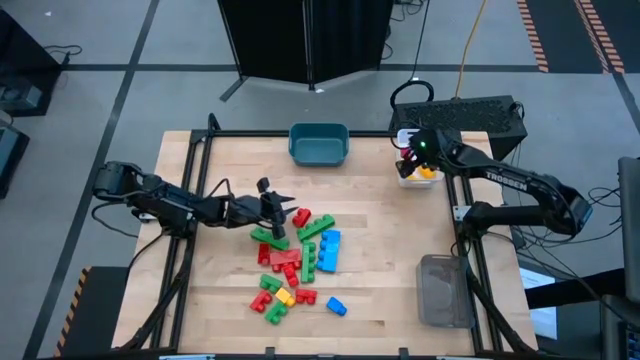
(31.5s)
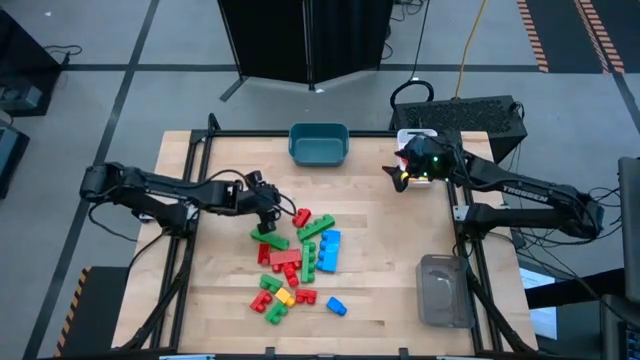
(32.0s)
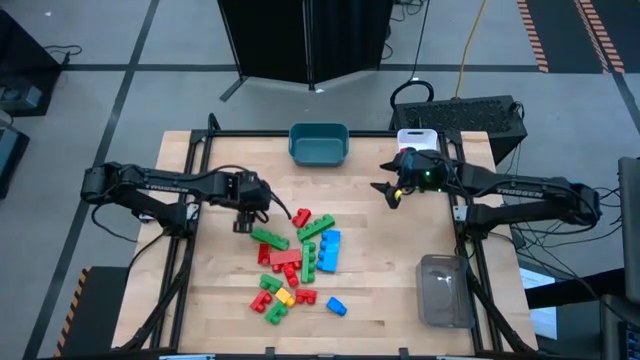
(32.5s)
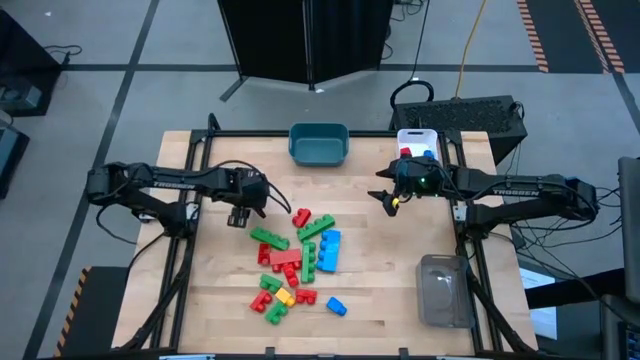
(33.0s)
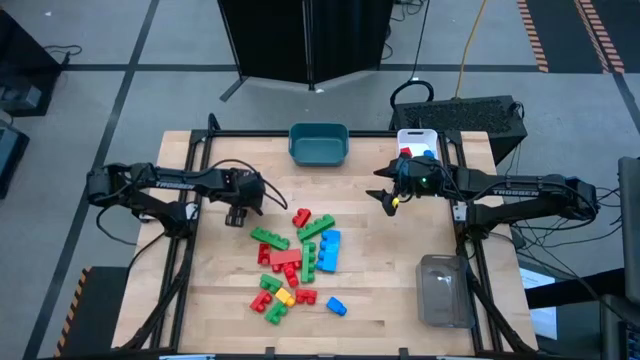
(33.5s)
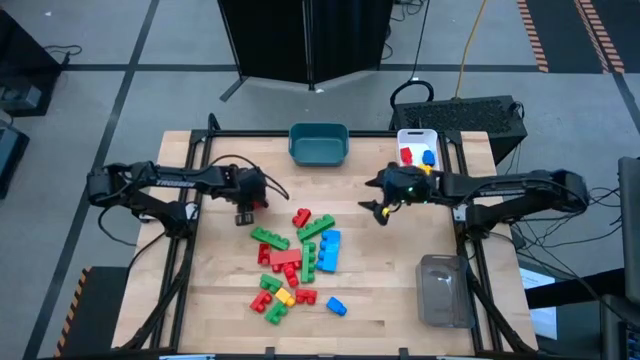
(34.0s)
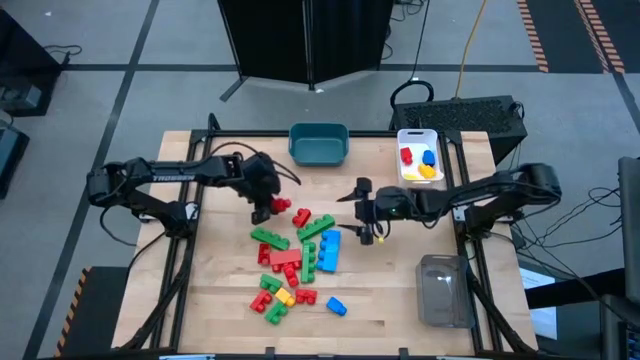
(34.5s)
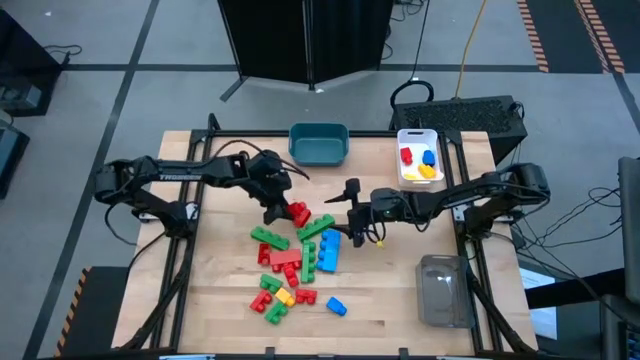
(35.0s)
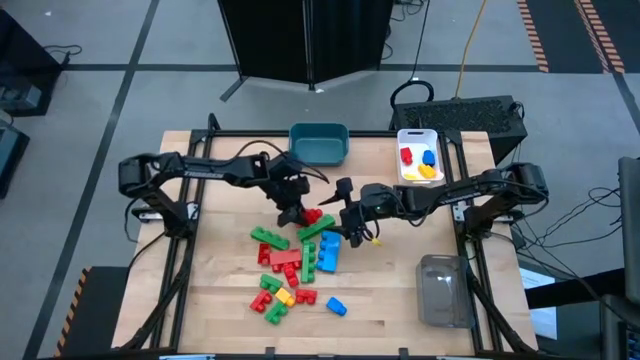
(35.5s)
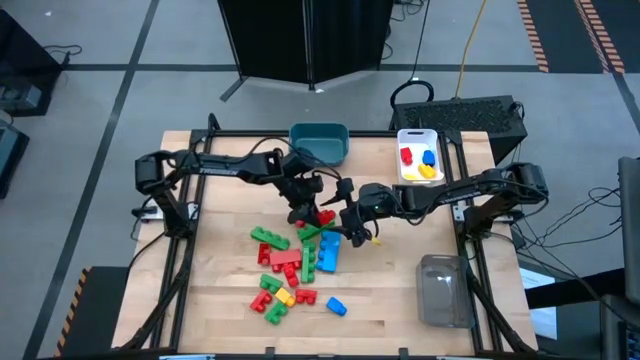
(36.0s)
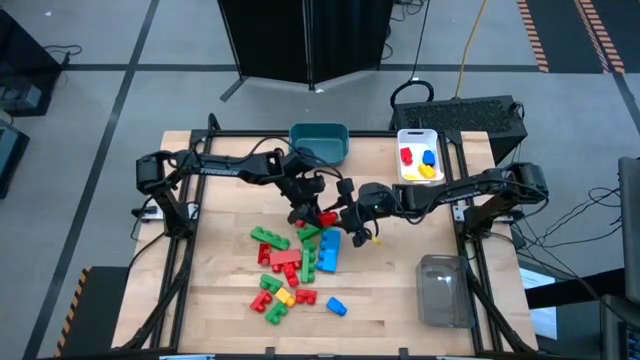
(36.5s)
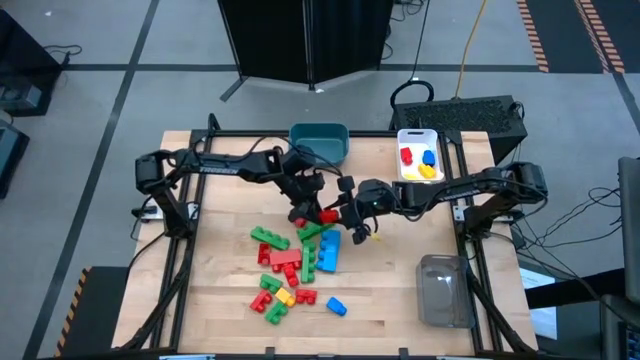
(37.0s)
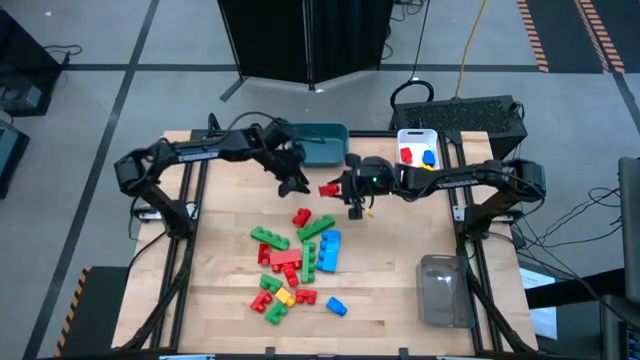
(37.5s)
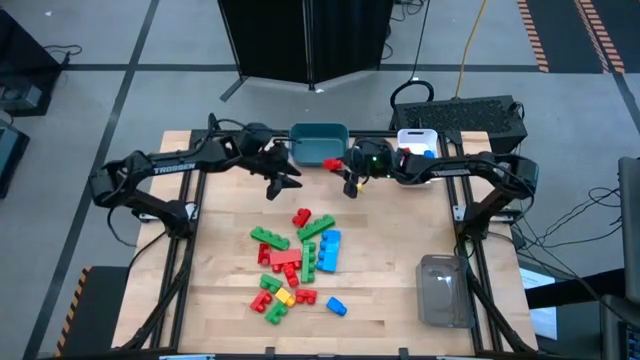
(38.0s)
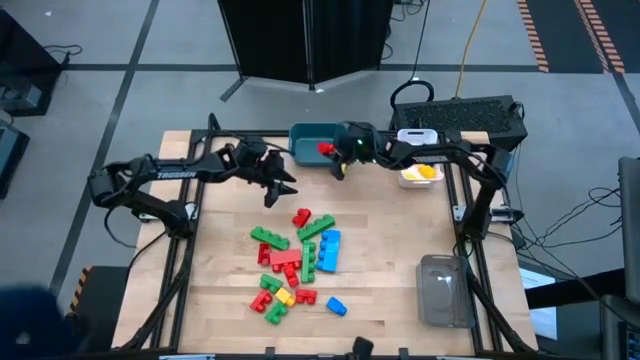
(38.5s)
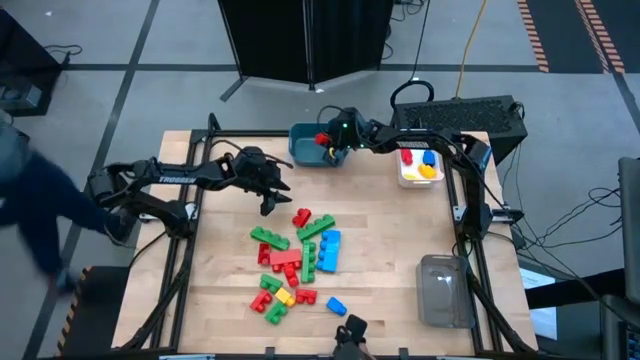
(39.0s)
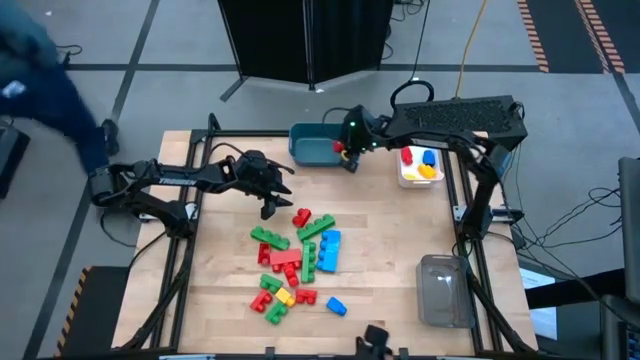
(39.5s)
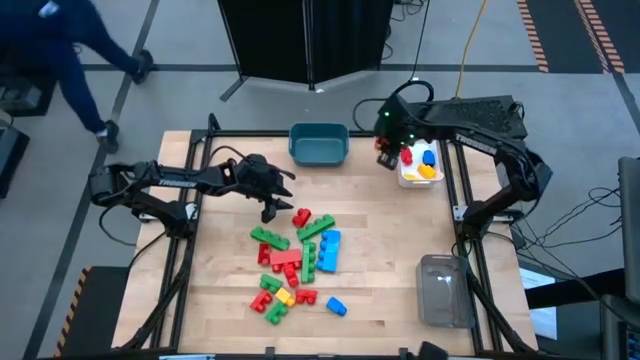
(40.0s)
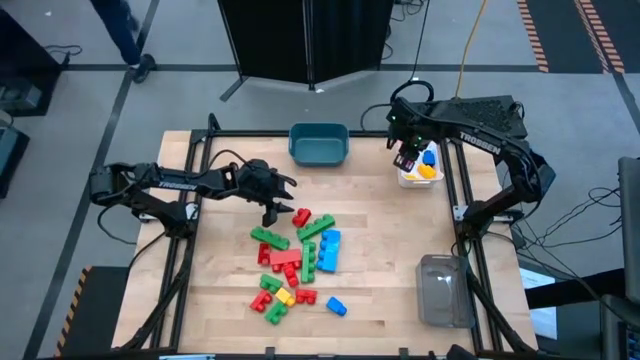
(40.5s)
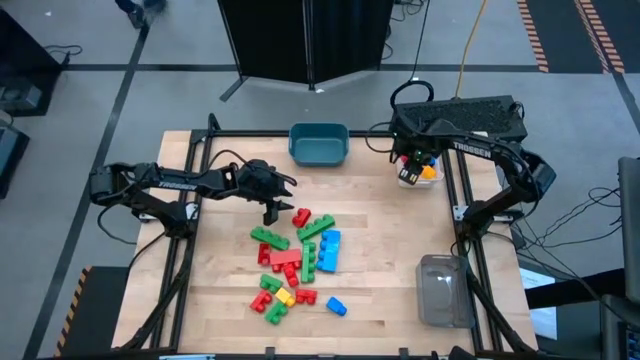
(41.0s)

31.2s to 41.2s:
Task: Sort blocks by size
Put the one stud red game piece into the white bin

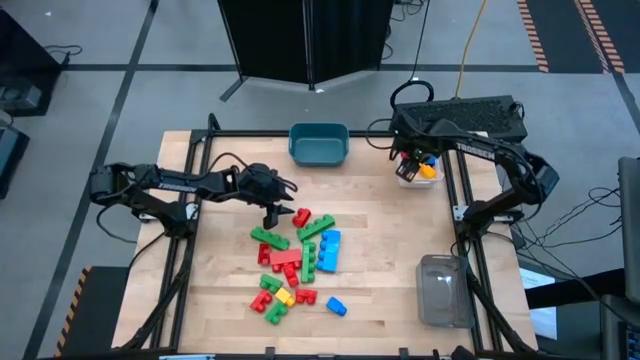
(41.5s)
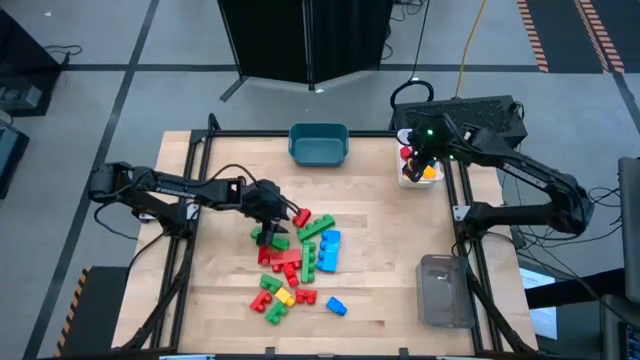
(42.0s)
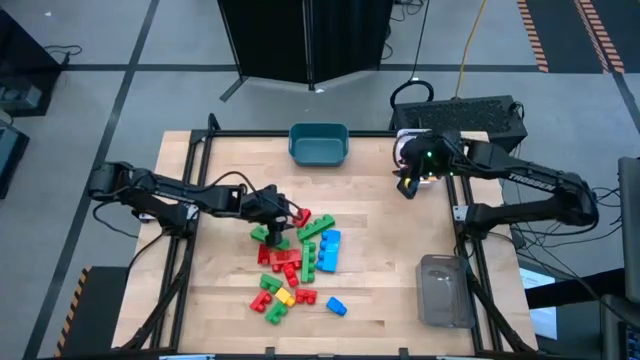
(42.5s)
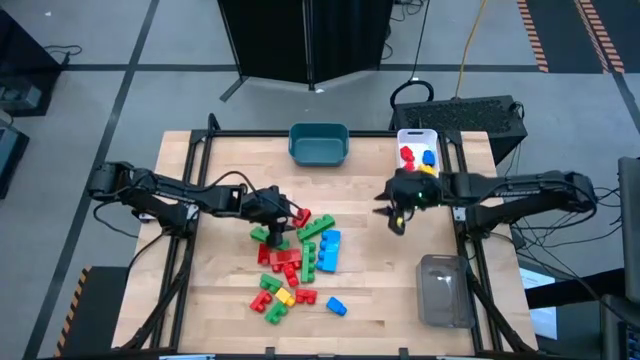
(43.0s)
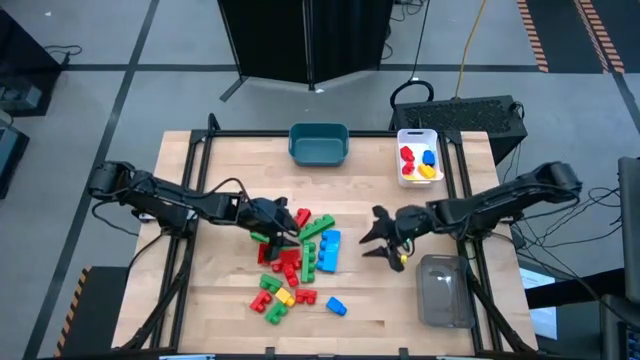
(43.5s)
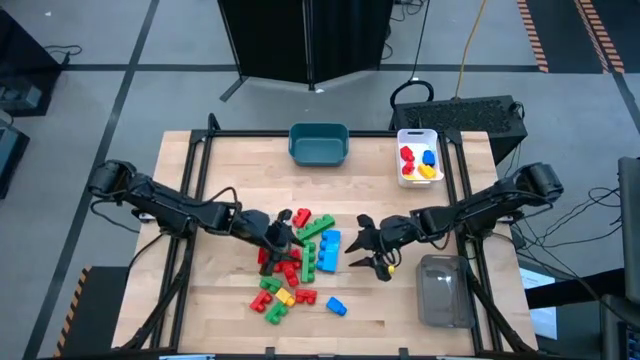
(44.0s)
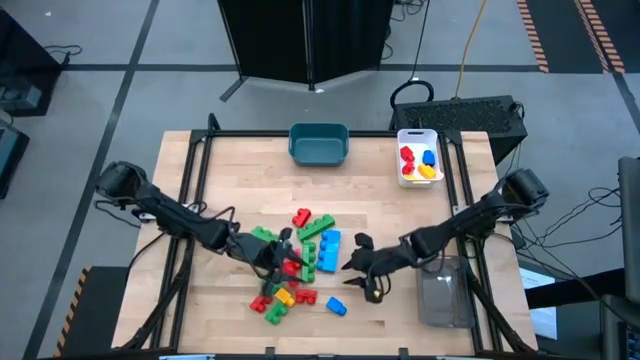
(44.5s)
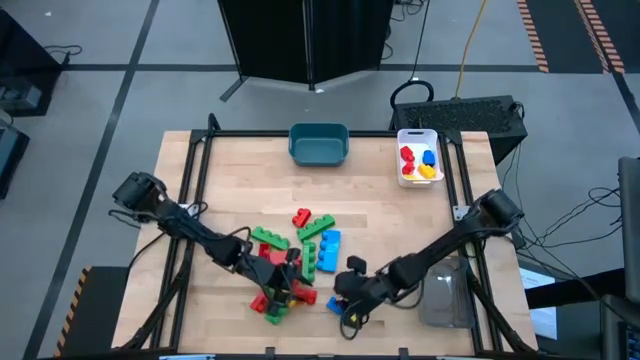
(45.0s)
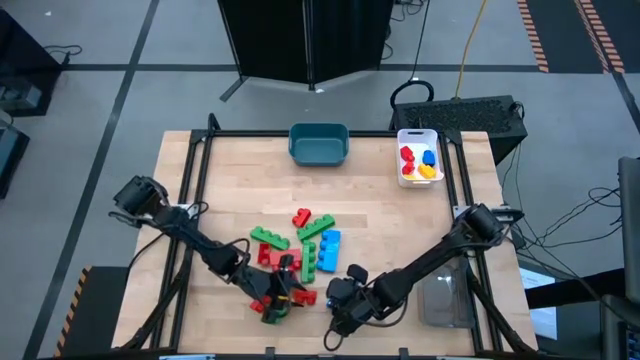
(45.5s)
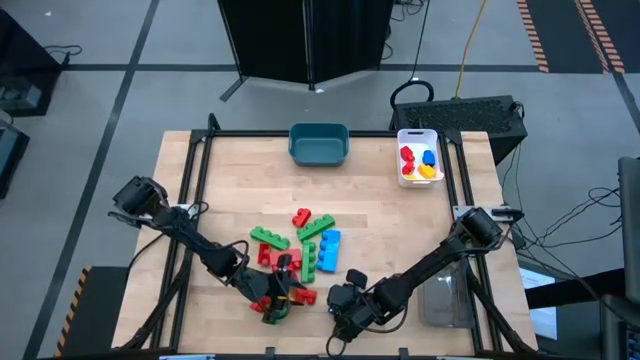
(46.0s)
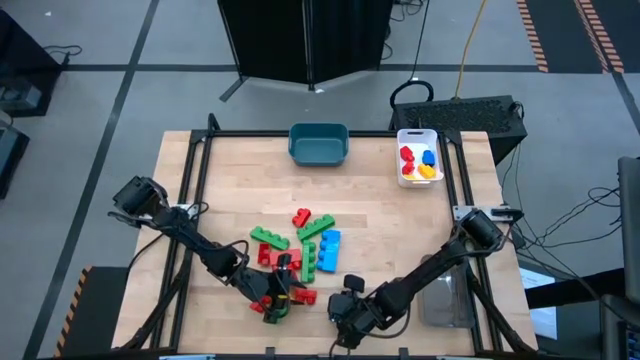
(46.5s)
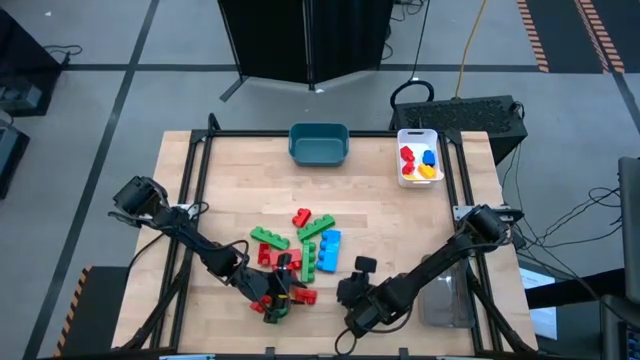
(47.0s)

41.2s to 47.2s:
Put the one stud blue game piece into the white bin

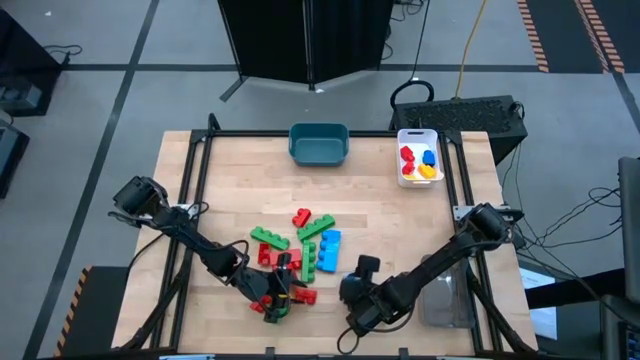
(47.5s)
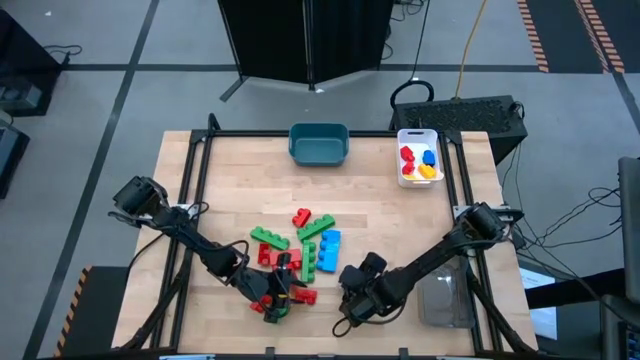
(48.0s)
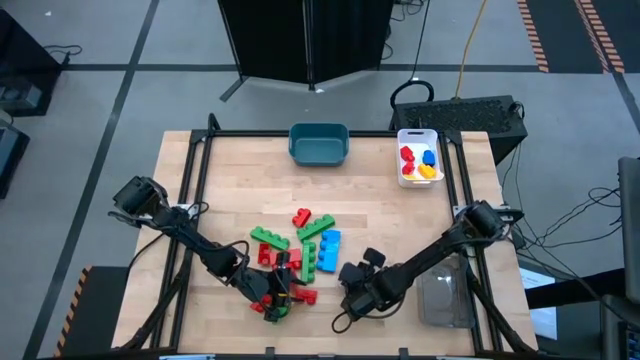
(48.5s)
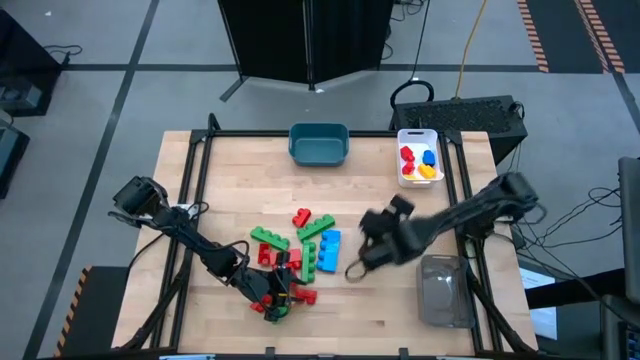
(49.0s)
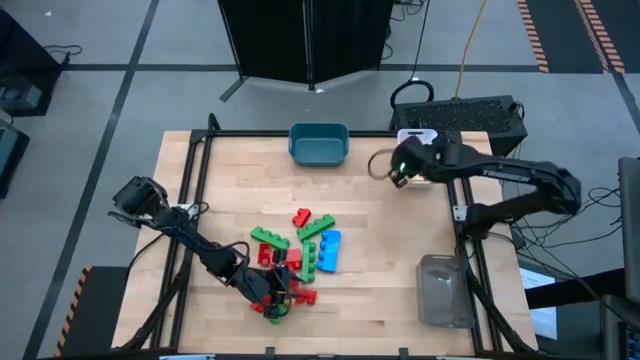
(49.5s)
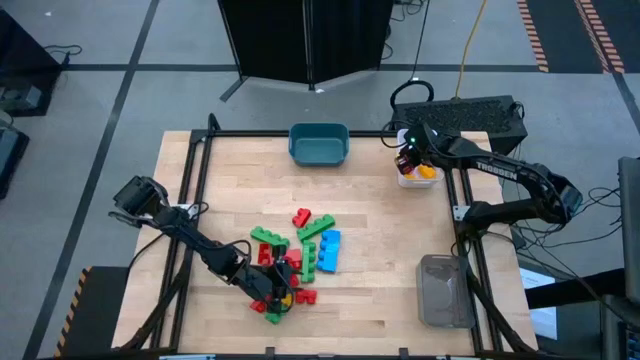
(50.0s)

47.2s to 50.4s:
Put the one stud blue game piece into the white bin

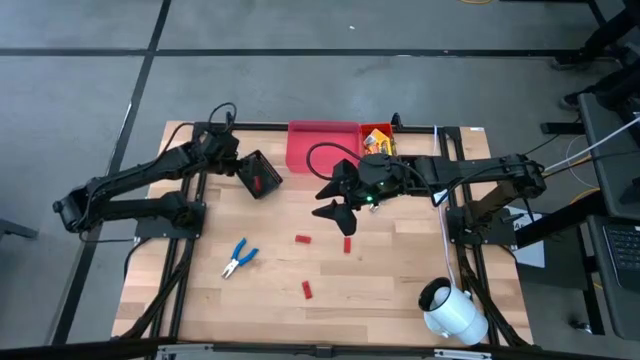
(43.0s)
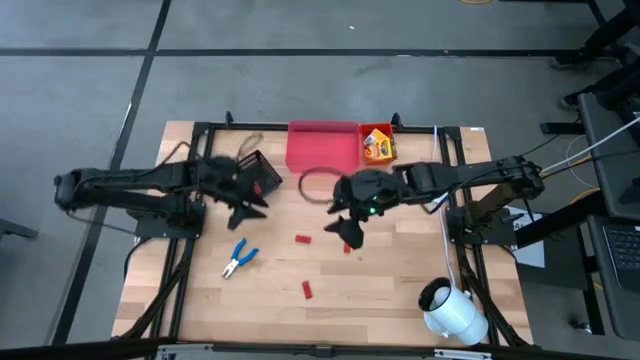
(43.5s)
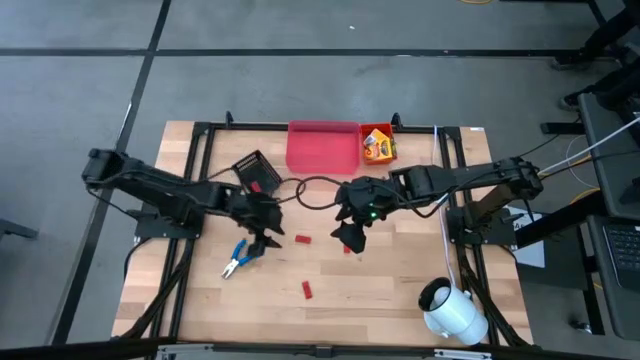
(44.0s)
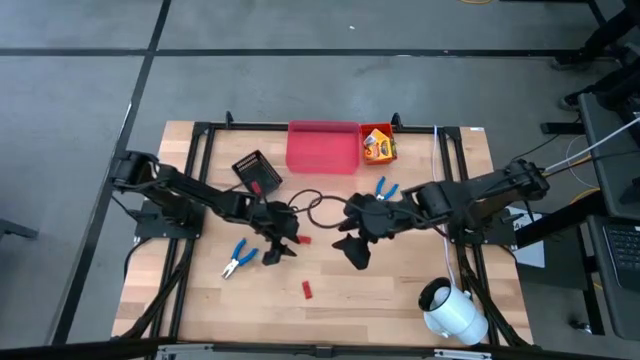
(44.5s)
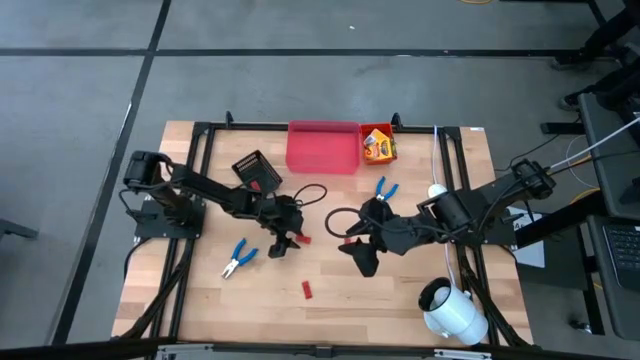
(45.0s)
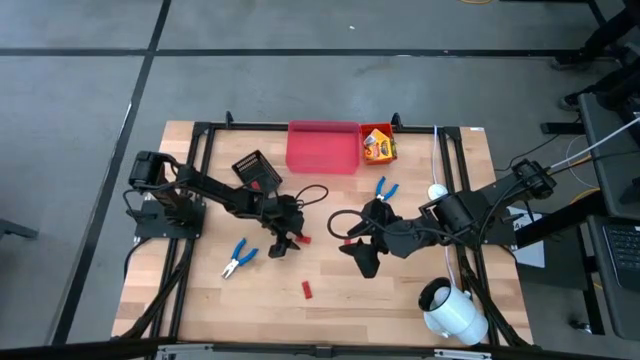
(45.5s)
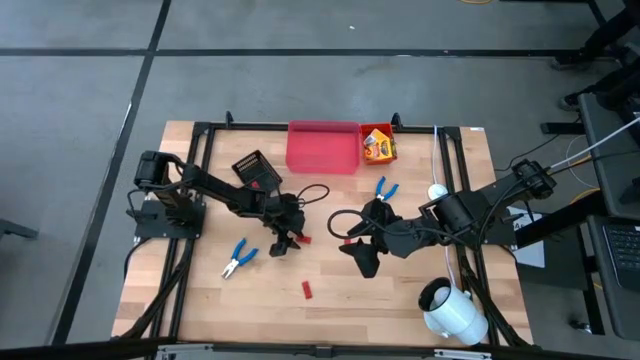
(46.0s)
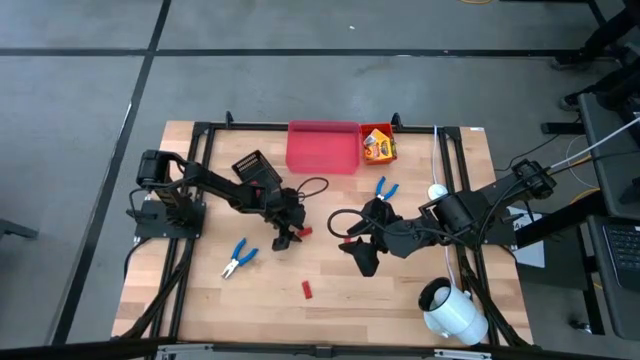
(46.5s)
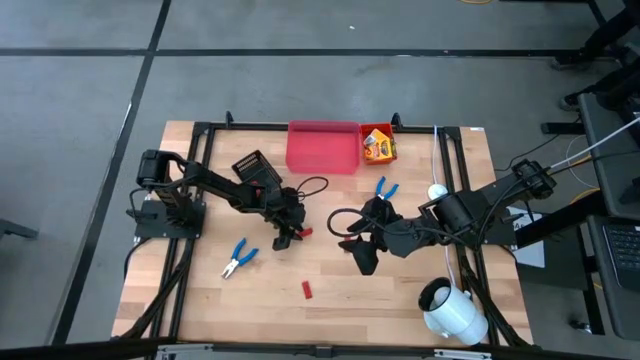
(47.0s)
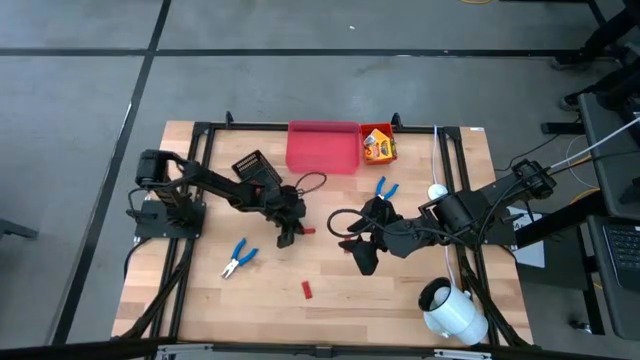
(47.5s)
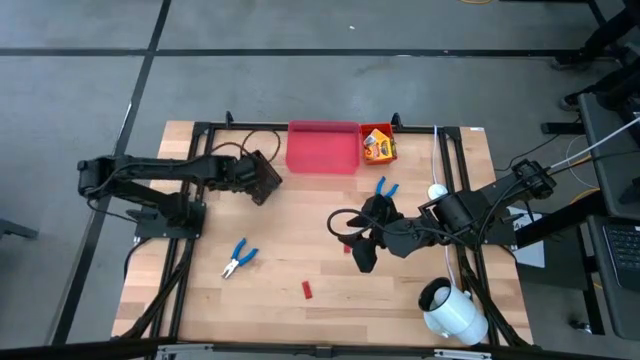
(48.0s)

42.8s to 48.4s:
Task: Pick & Place School Supplies
Put the red eraser into the black bin
